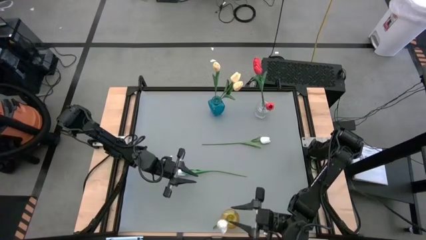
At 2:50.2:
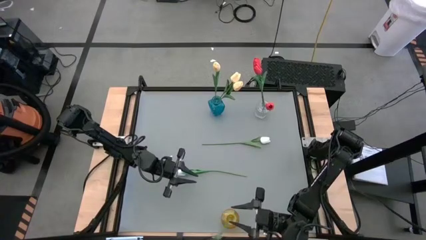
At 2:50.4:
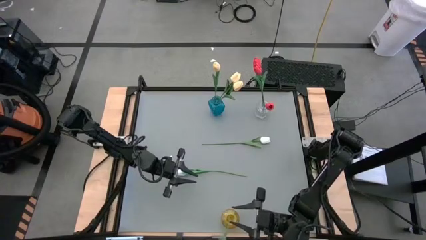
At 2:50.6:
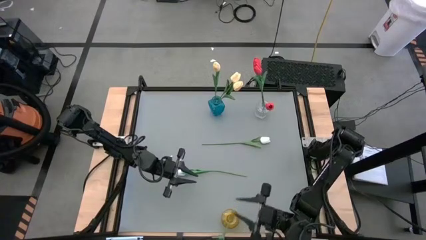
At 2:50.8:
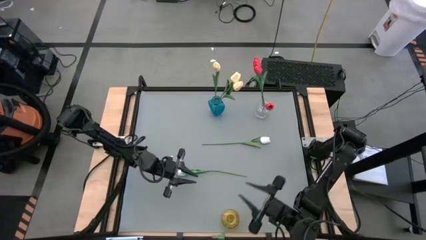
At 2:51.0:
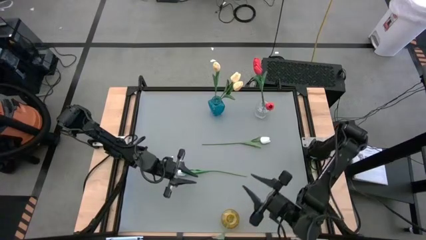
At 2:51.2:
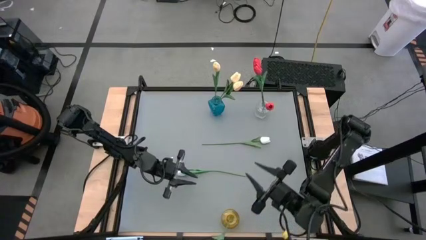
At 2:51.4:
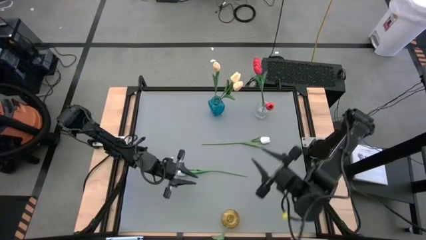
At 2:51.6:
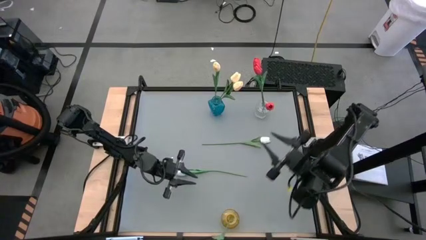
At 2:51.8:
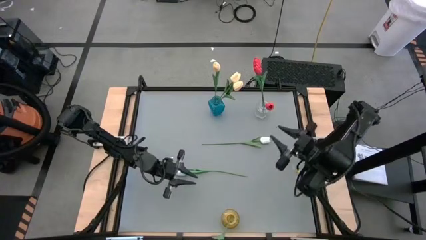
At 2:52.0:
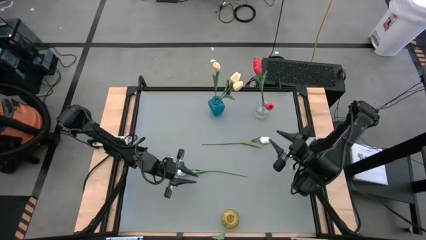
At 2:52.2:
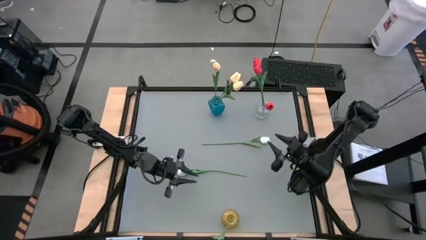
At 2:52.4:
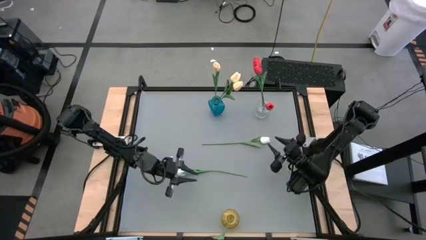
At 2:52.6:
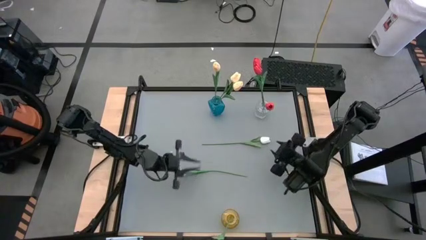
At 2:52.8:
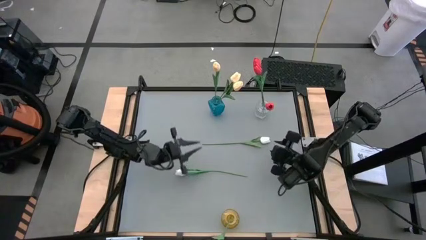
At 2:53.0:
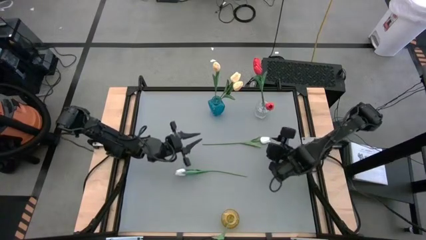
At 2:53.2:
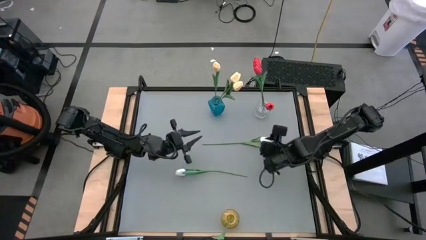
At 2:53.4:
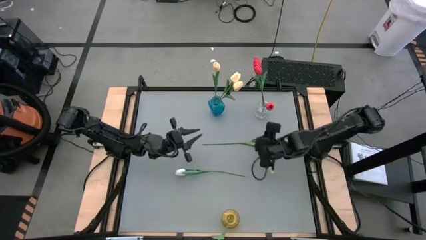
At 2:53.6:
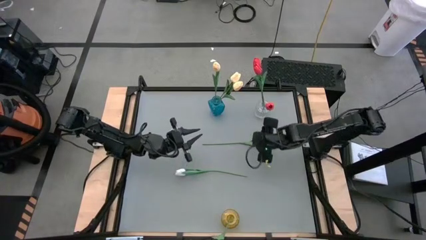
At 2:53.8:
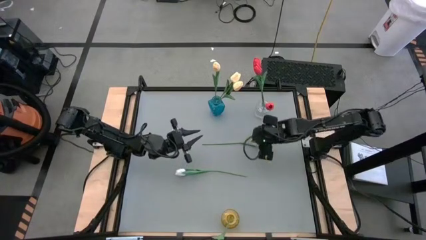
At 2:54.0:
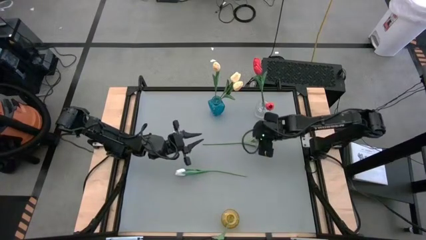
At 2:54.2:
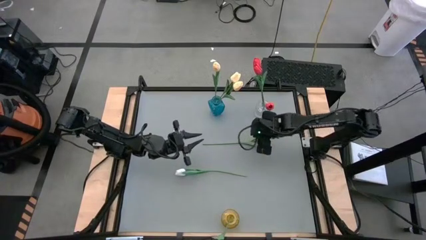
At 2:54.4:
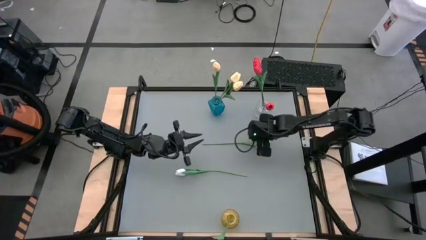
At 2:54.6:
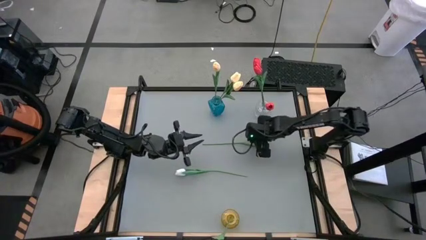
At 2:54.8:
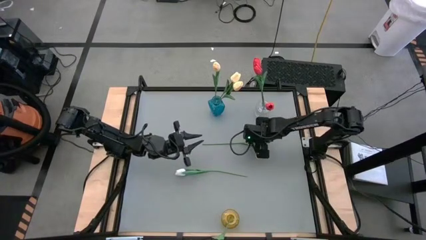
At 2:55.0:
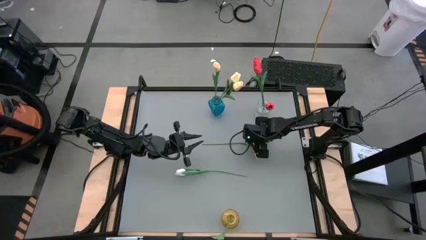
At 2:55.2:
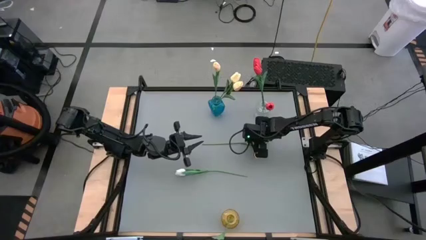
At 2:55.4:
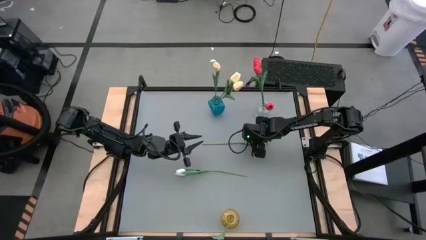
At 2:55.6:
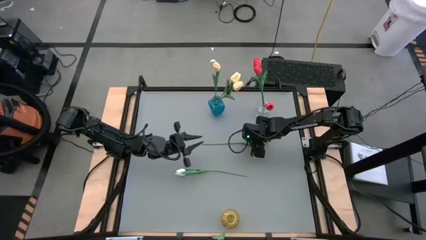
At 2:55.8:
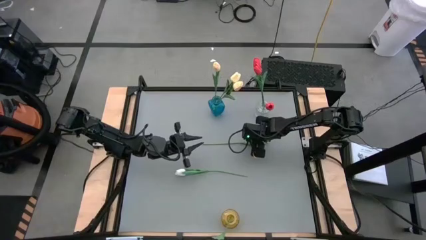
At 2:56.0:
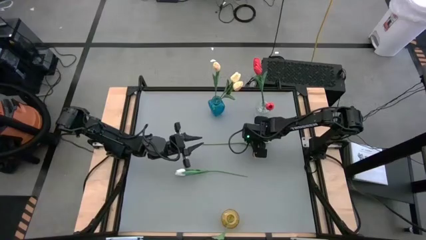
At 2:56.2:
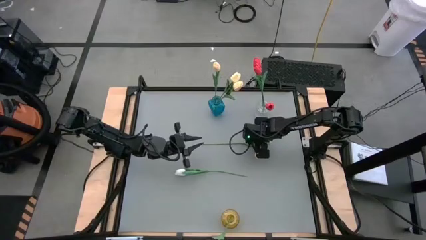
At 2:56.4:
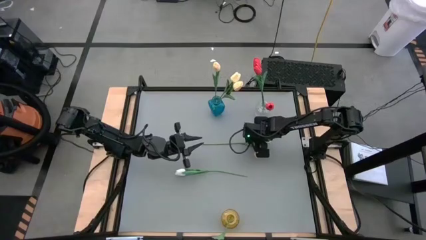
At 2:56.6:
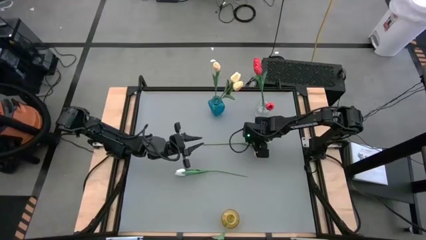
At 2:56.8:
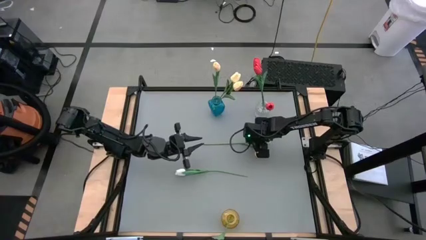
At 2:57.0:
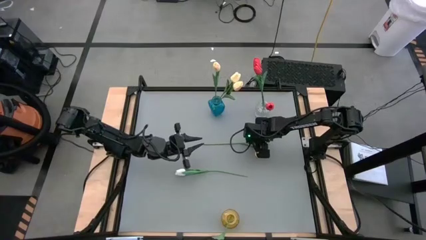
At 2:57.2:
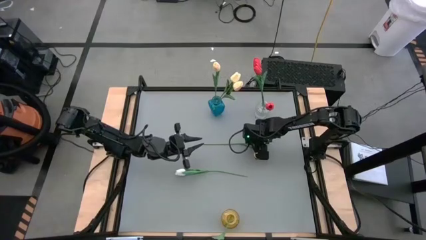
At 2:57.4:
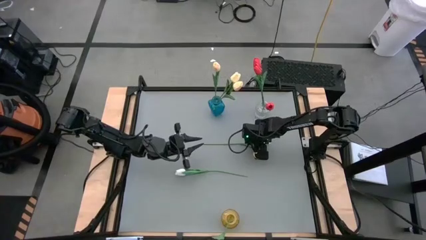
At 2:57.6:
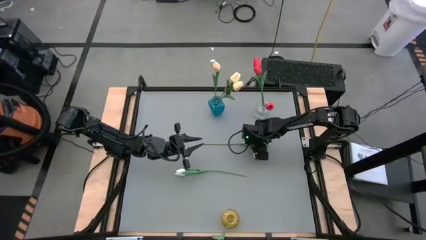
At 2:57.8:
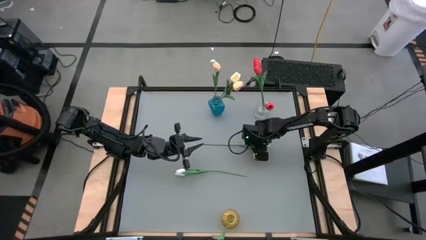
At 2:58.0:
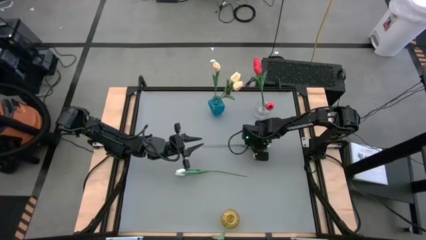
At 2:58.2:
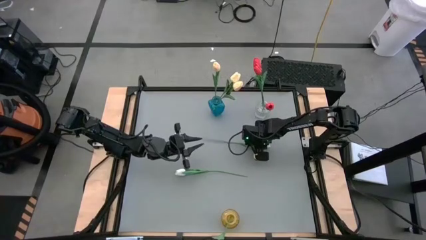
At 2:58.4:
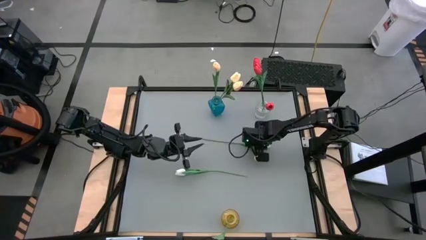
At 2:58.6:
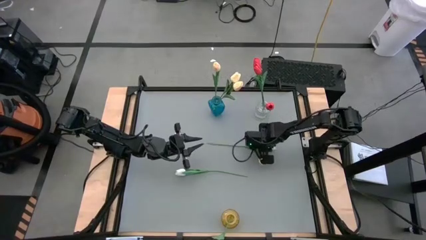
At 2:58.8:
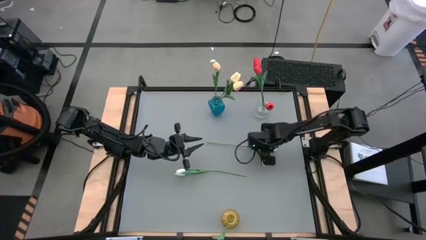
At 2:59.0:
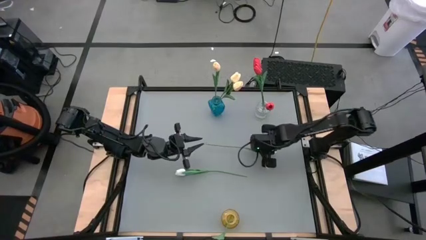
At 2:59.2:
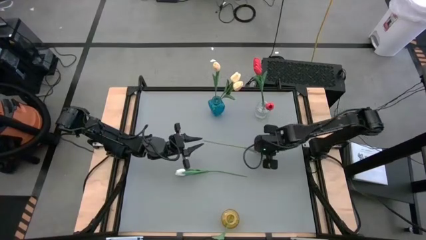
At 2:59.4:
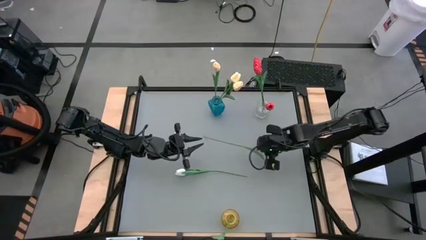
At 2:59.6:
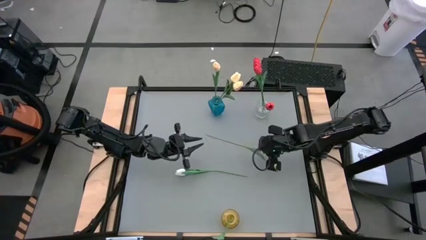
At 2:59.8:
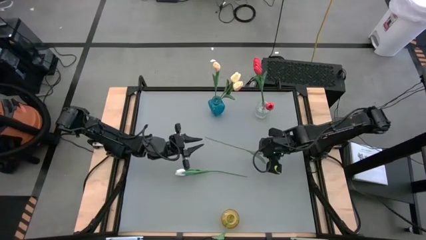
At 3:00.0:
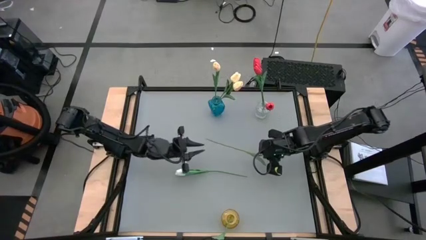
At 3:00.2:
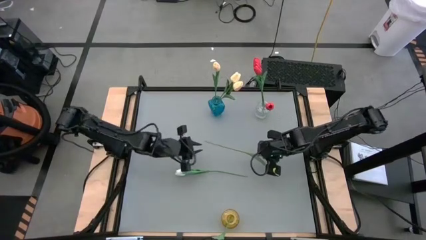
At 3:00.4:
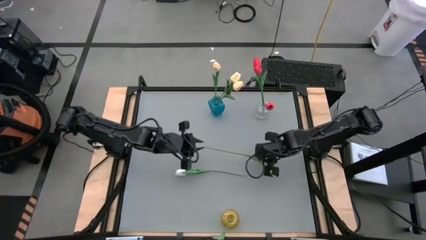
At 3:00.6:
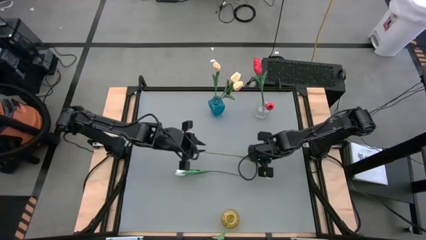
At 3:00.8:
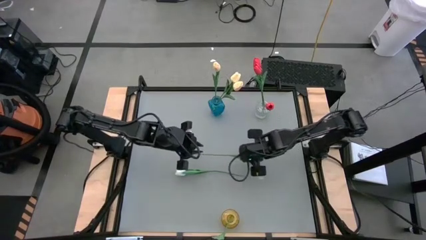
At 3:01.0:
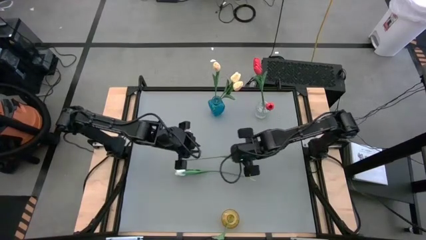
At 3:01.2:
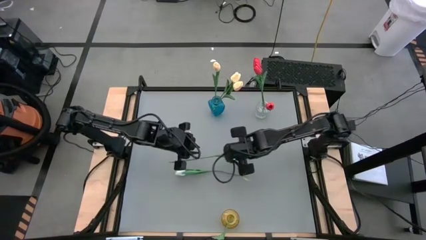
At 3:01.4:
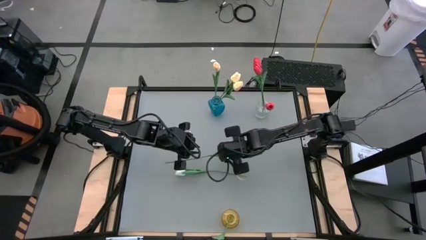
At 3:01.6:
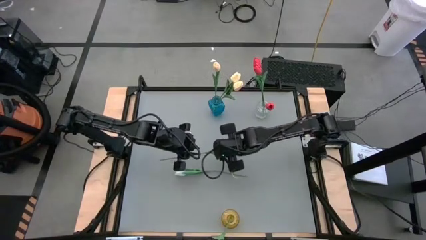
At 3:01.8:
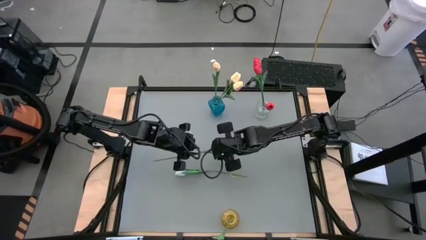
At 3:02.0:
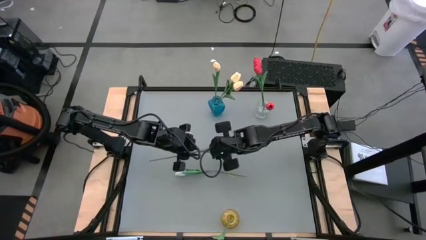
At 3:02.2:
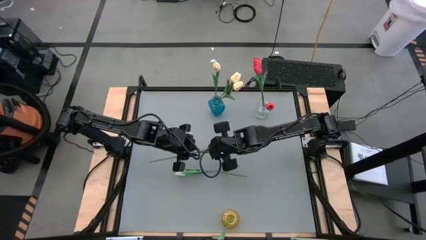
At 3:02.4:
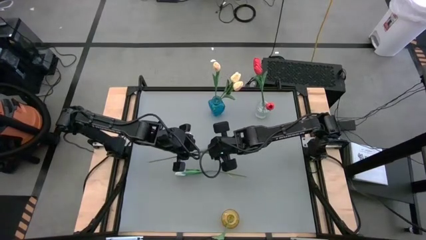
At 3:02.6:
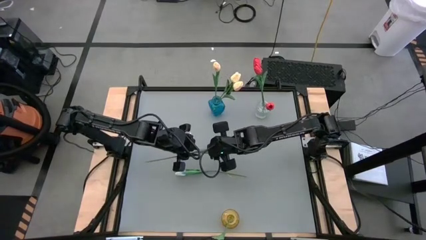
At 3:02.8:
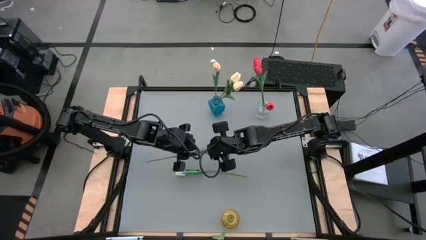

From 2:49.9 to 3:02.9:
Task: Sort flowers into vase by color
Put the top white flower into the yellow vase
